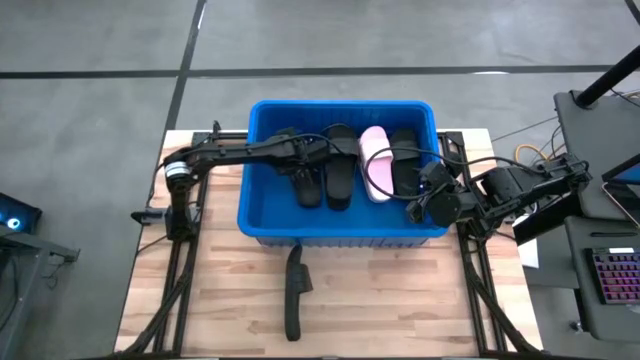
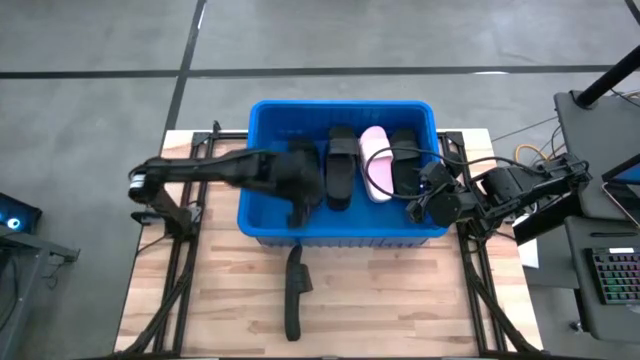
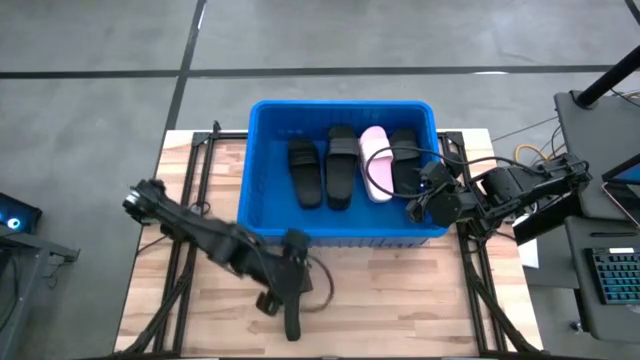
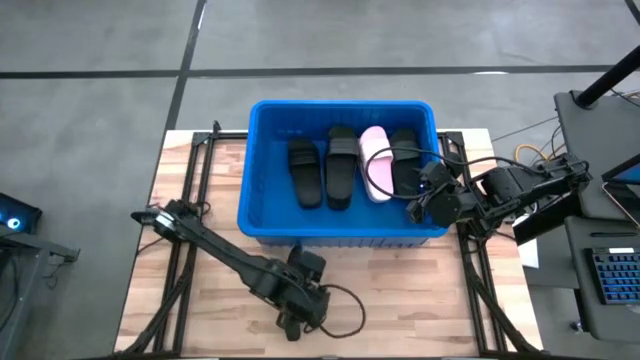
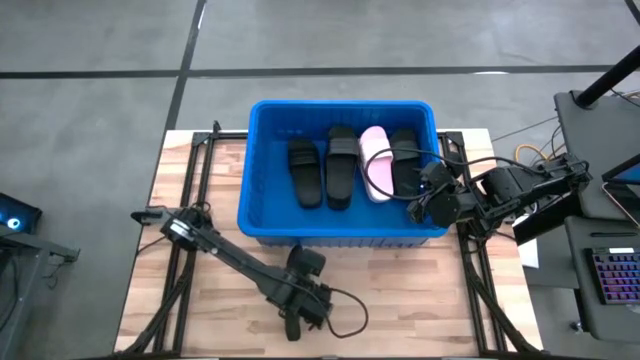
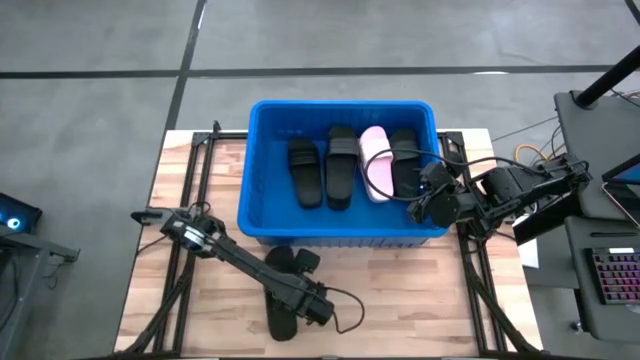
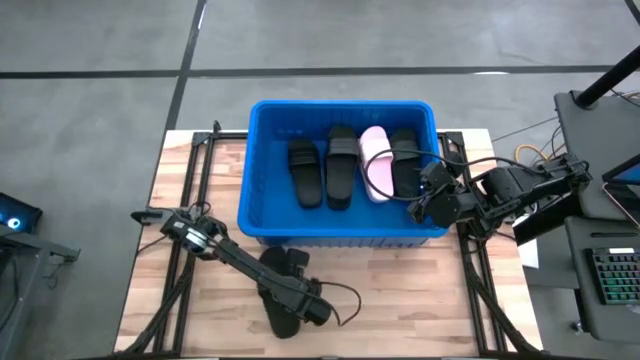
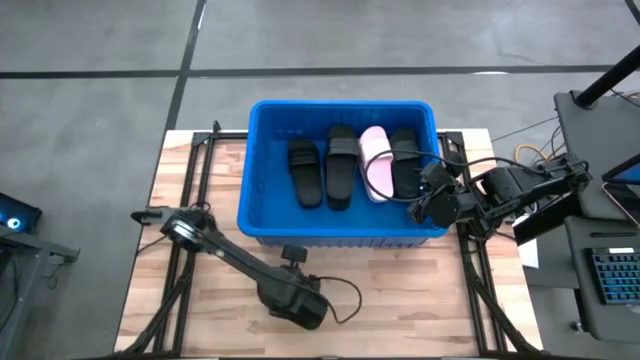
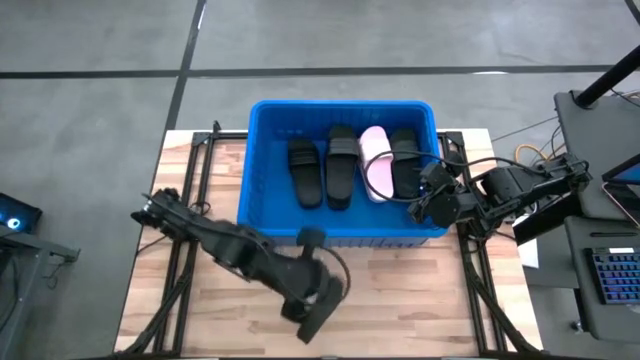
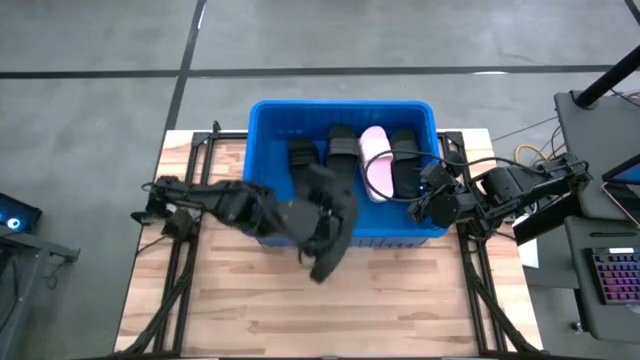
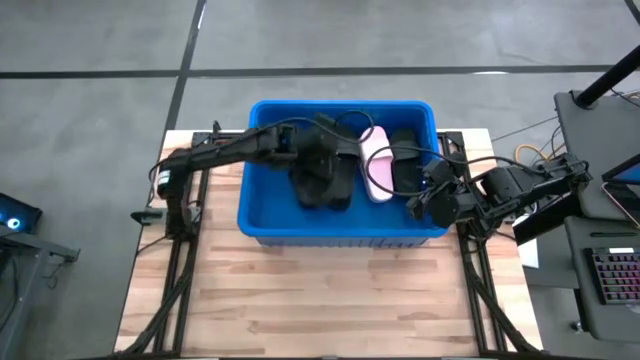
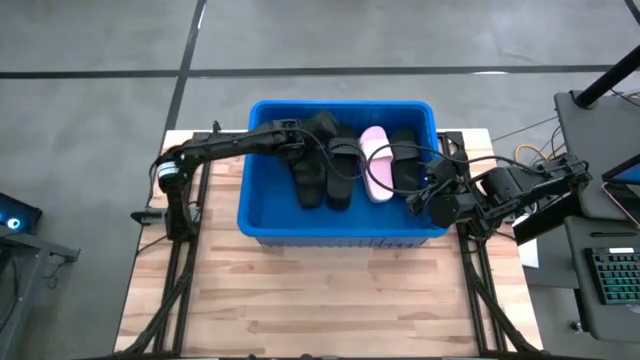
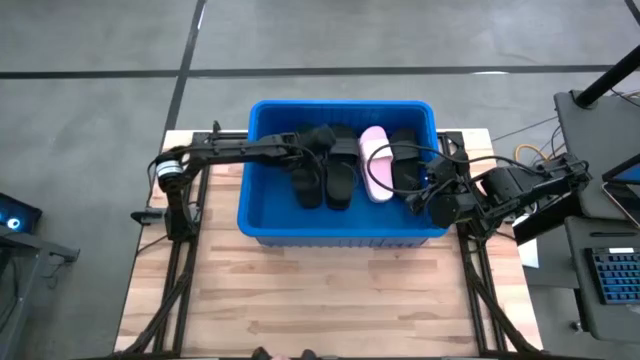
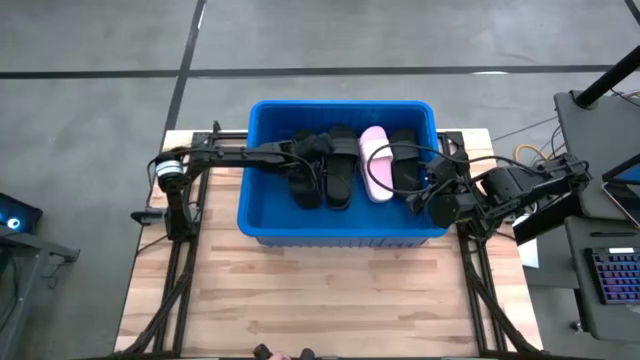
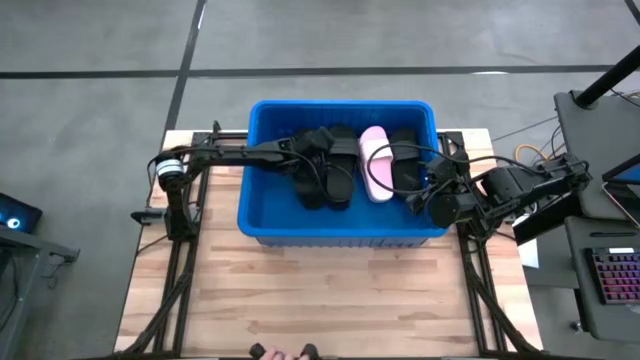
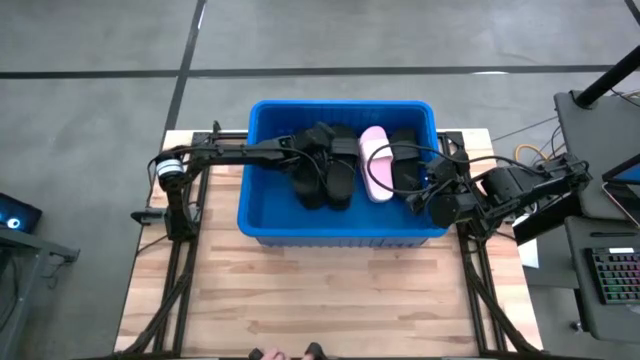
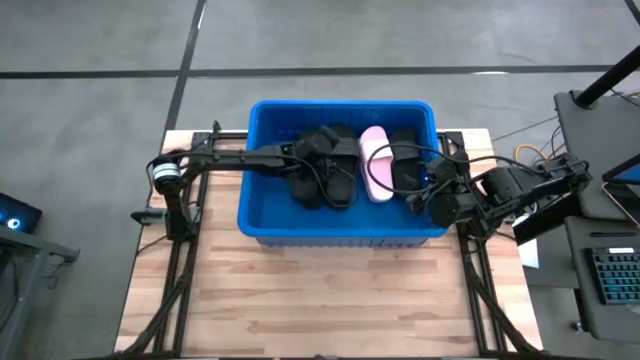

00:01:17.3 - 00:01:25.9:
Task: Pick and place slides into bin
Put the black slide into the blue bin

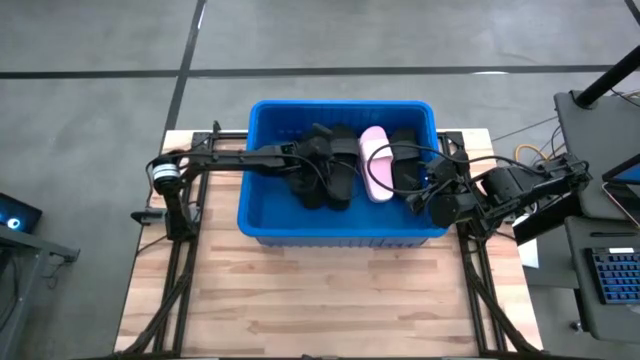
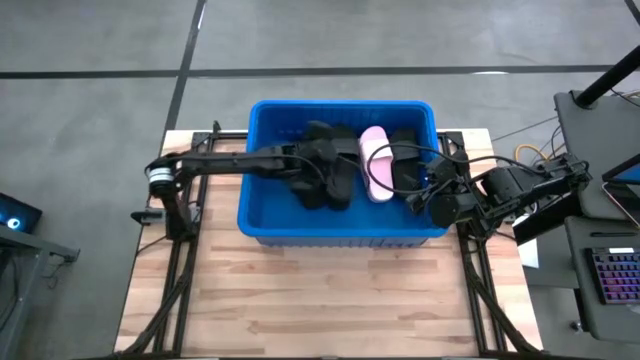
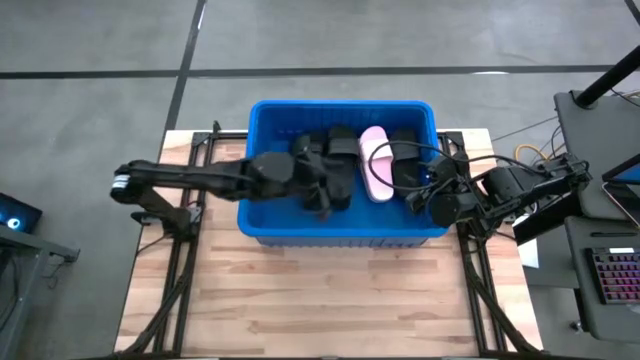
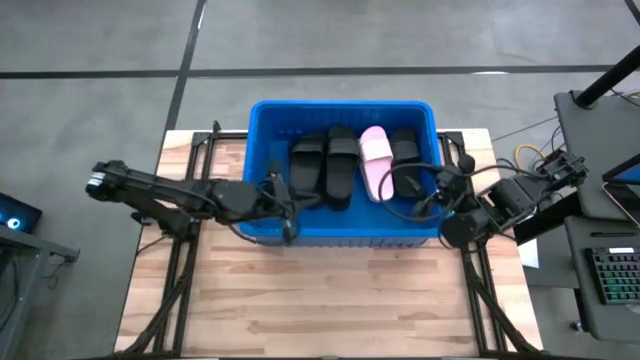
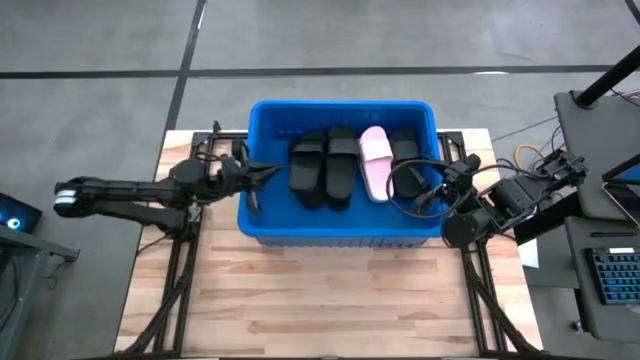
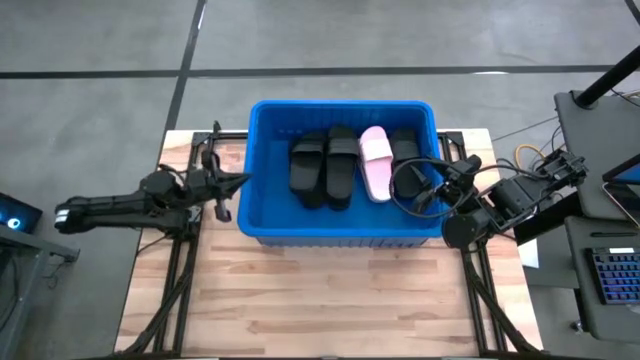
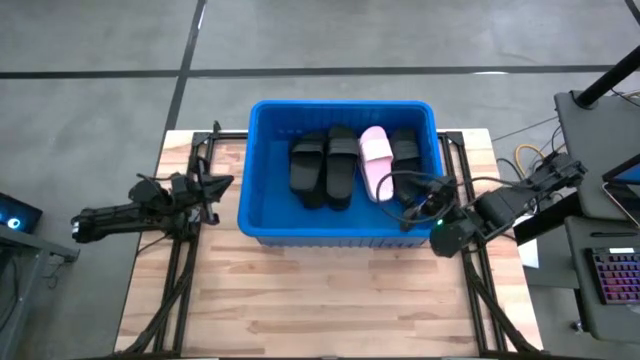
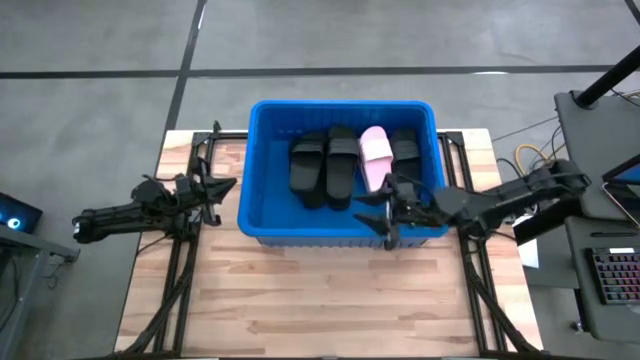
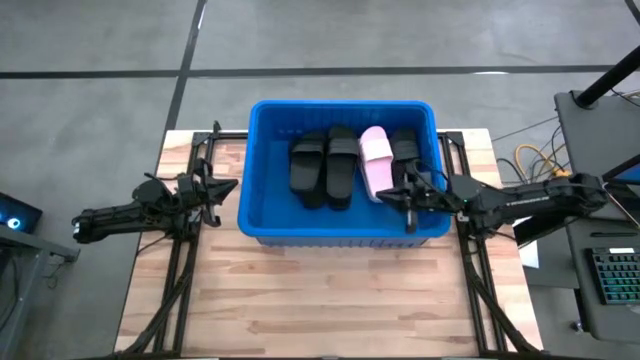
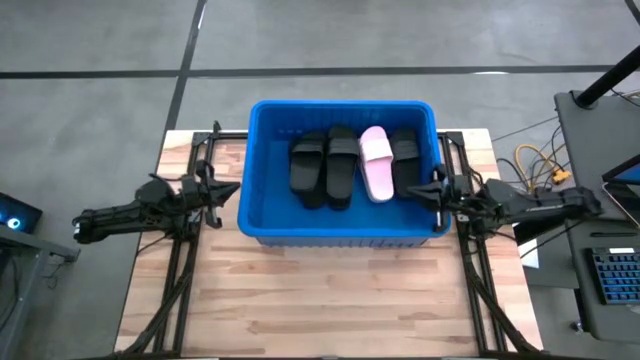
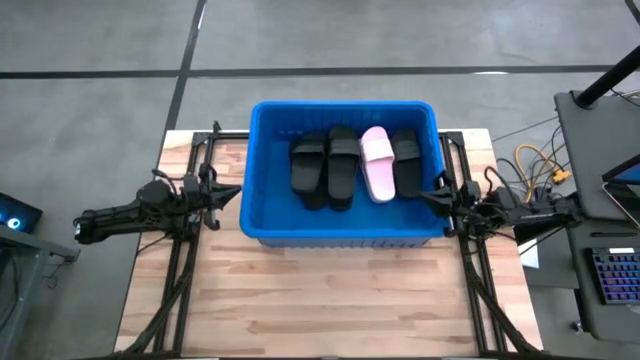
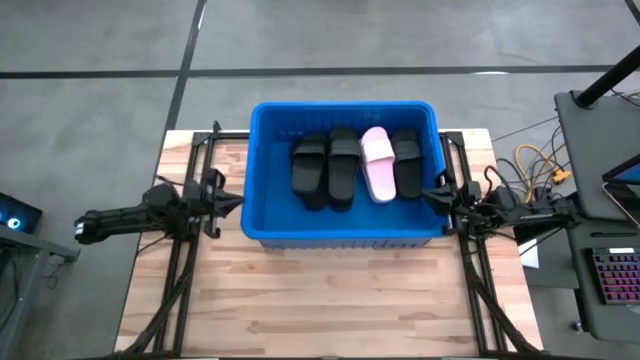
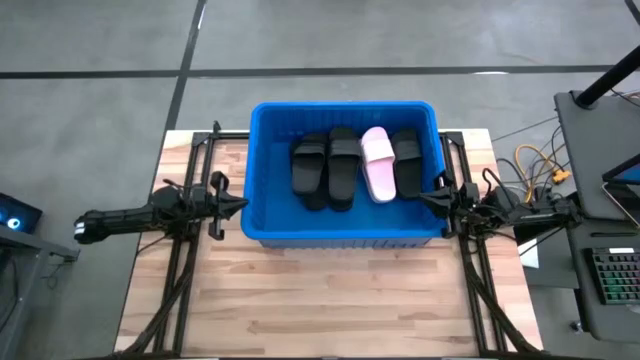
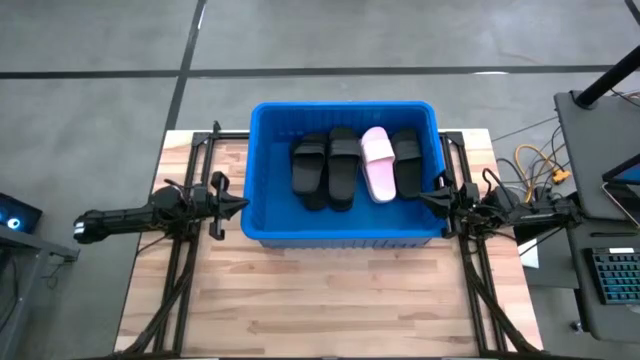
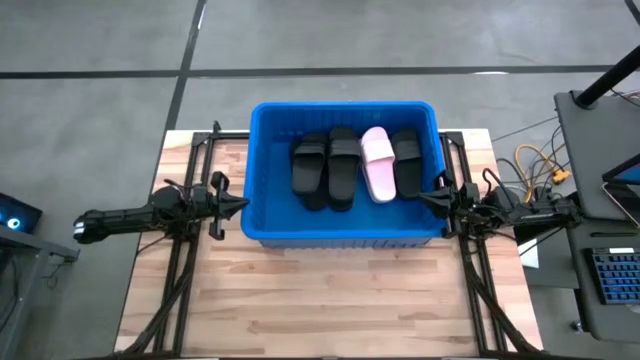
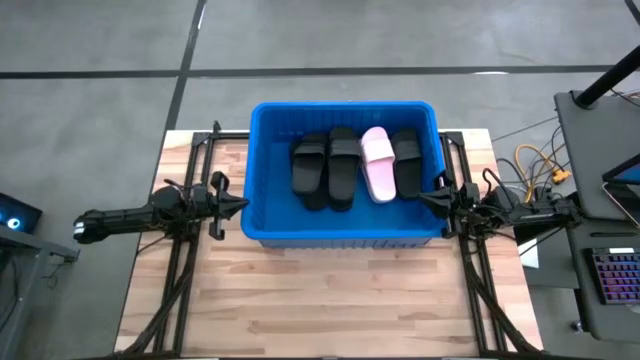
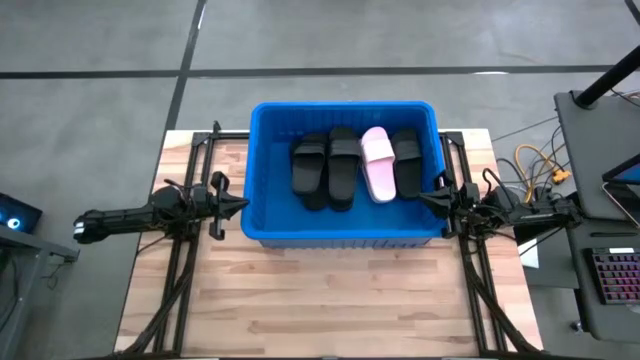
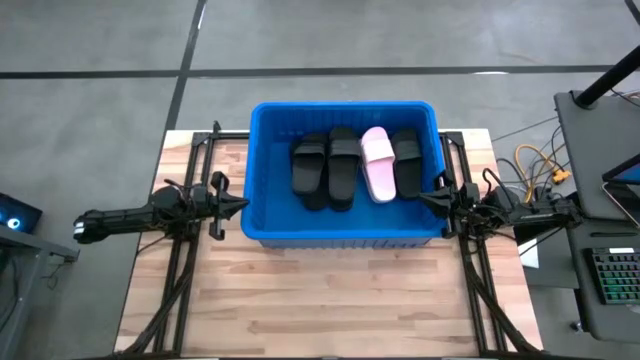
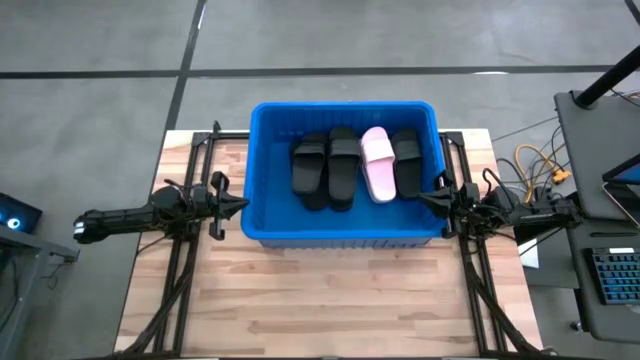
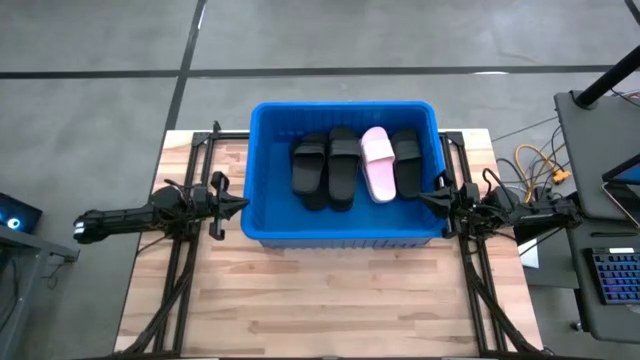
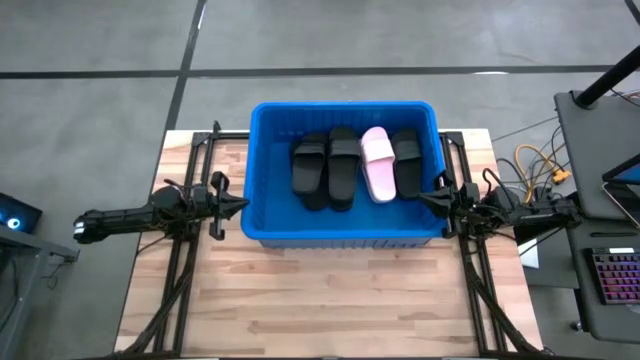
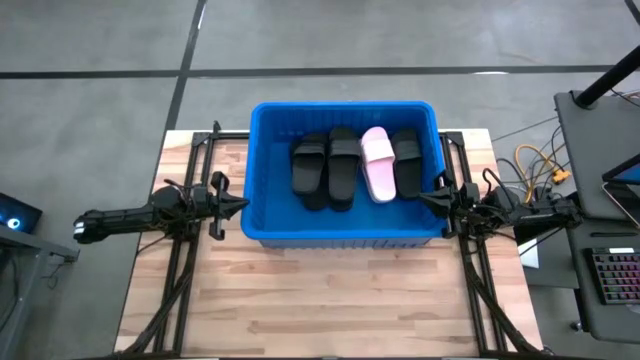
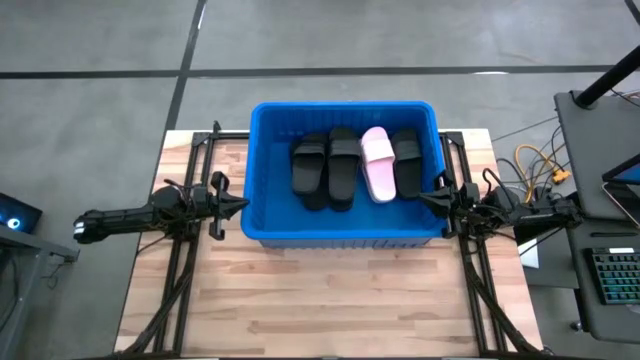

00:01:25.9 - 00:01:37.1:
Return to Home Position

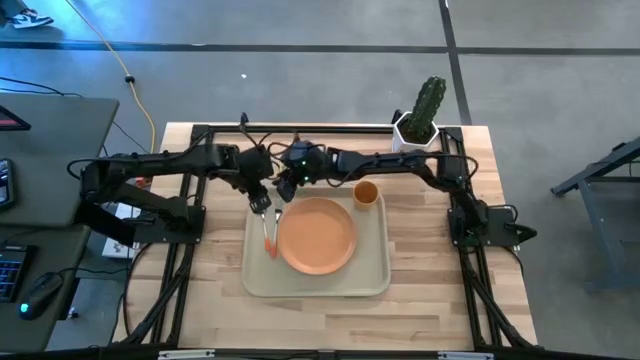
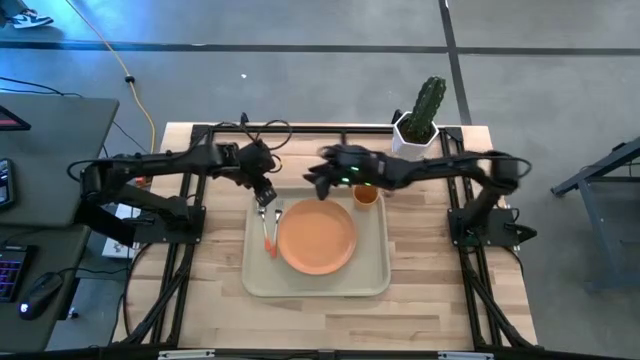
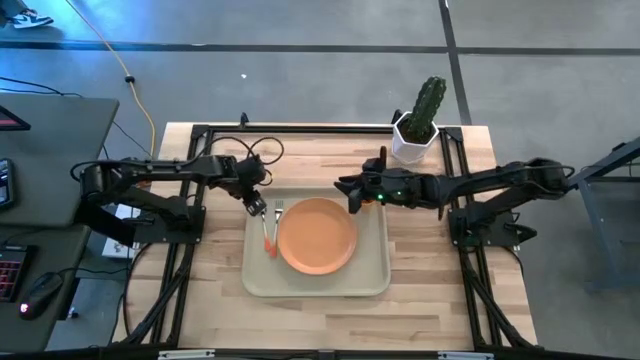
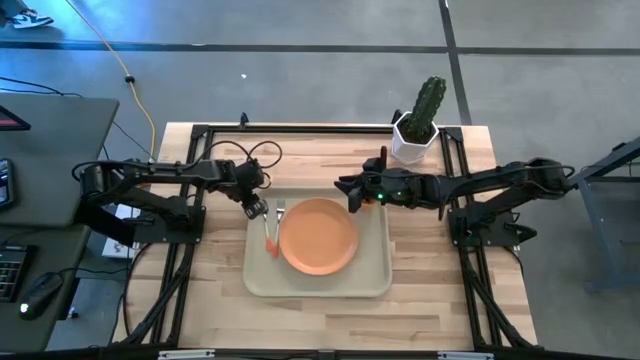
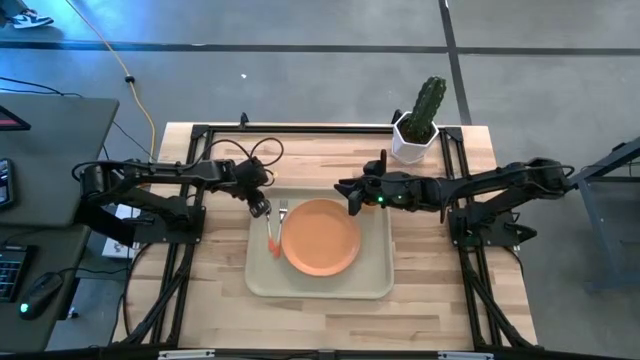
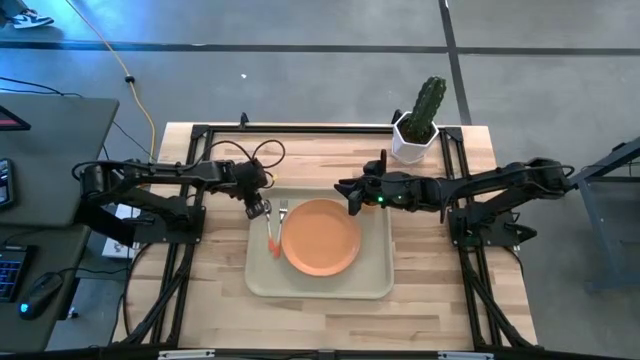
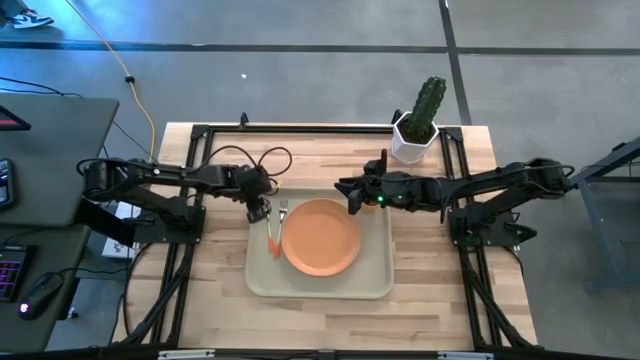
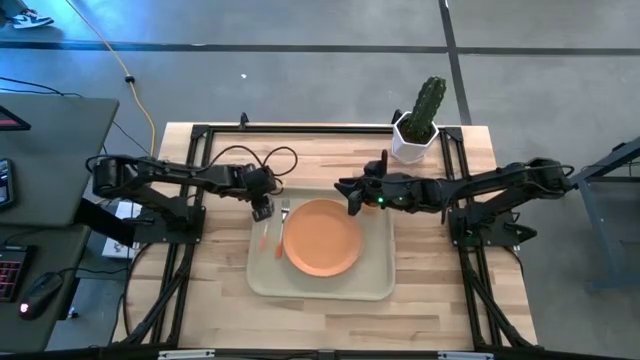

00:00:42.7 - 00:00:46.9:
Task: Pick and place plate/cup/fork/spoon on tray
Adjust the orange spoon on the gray tray
